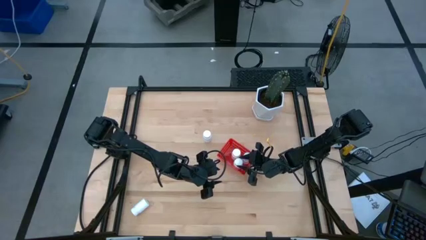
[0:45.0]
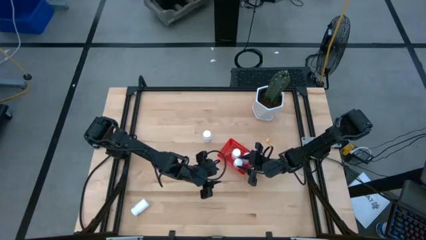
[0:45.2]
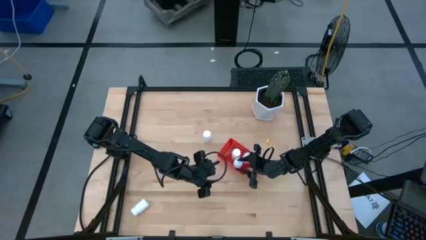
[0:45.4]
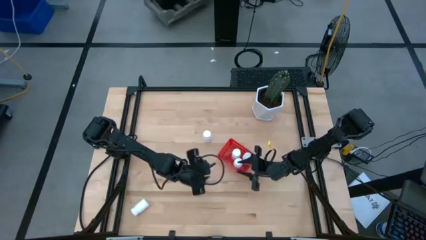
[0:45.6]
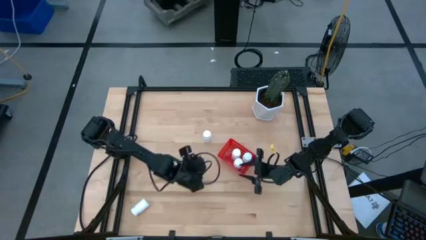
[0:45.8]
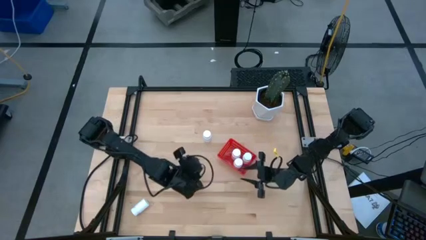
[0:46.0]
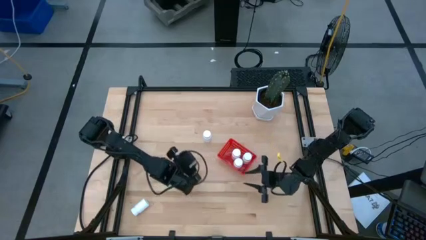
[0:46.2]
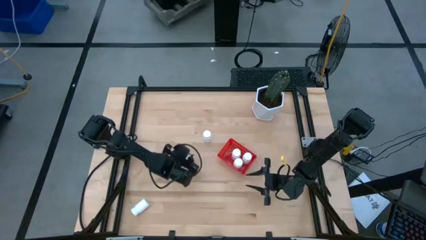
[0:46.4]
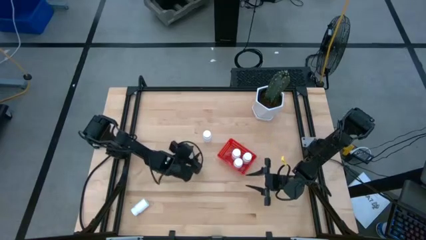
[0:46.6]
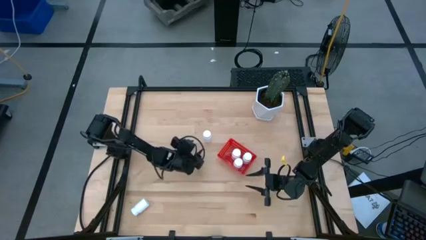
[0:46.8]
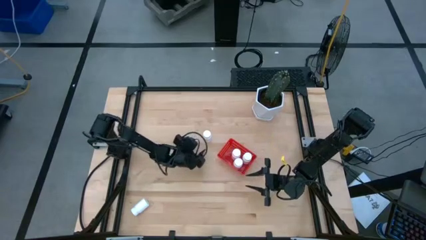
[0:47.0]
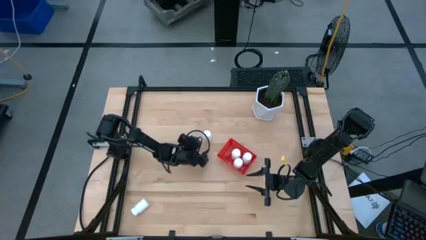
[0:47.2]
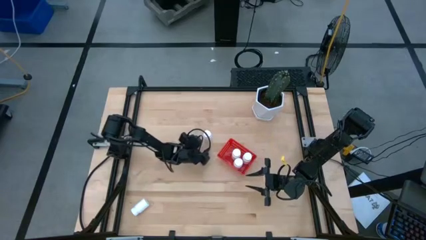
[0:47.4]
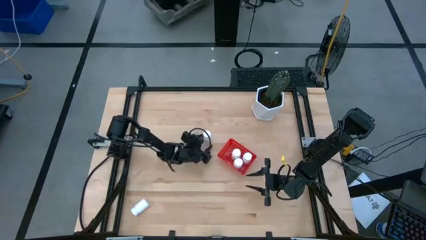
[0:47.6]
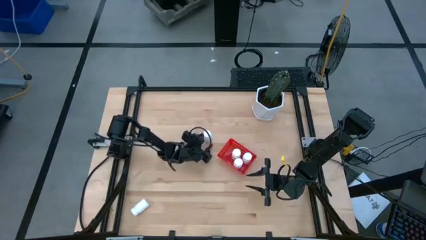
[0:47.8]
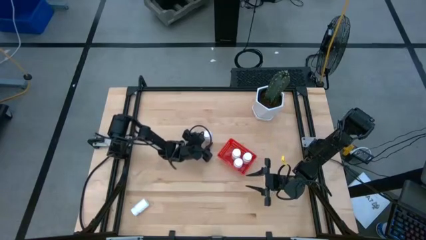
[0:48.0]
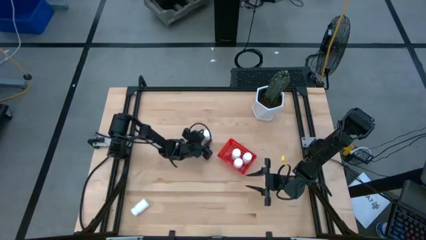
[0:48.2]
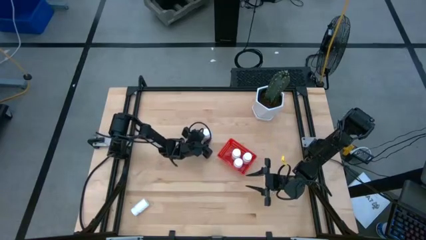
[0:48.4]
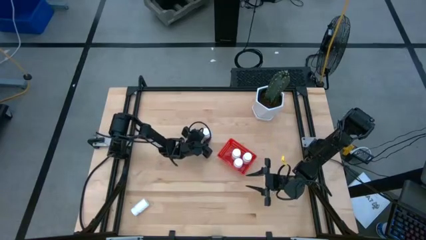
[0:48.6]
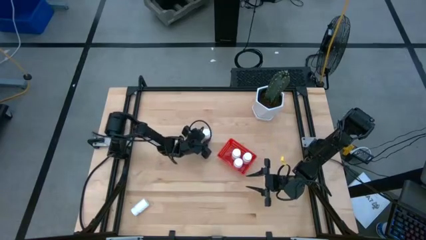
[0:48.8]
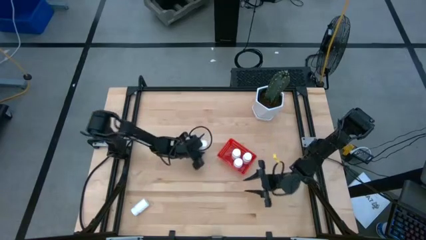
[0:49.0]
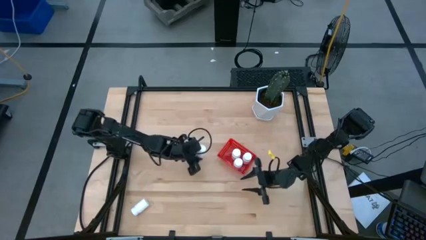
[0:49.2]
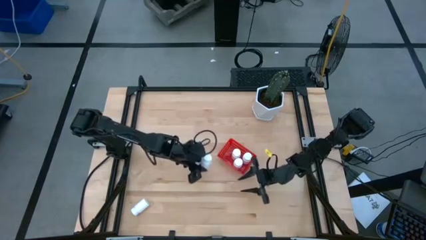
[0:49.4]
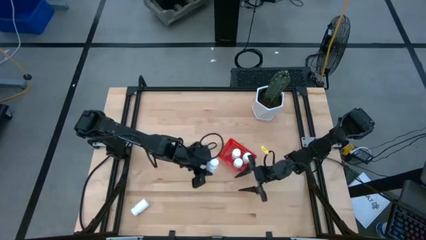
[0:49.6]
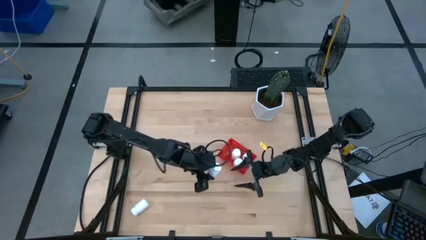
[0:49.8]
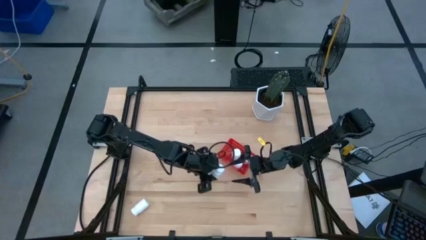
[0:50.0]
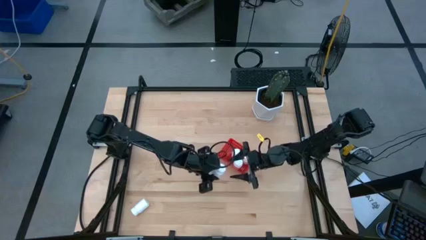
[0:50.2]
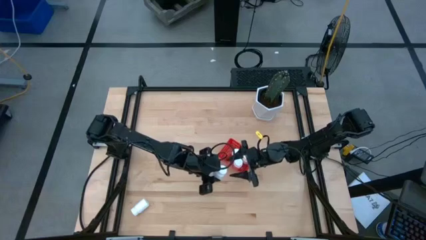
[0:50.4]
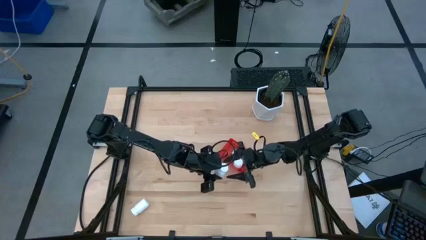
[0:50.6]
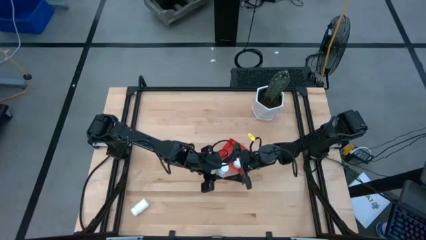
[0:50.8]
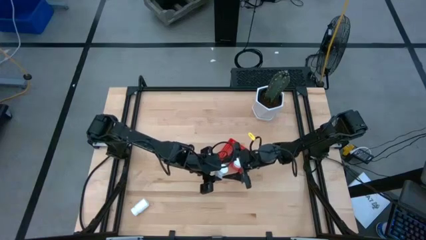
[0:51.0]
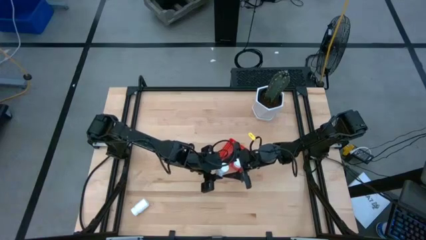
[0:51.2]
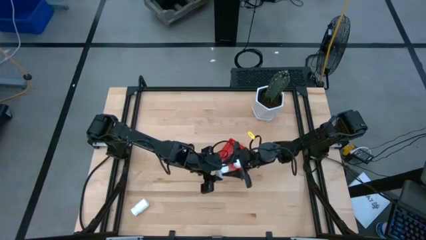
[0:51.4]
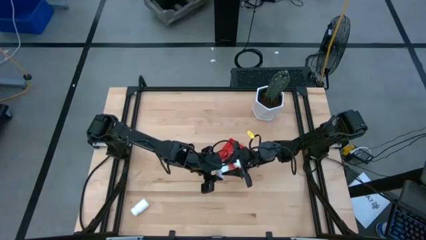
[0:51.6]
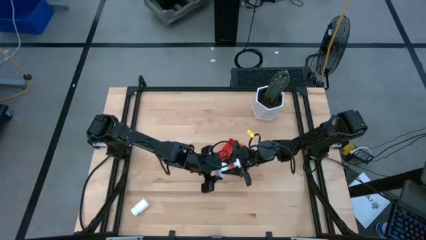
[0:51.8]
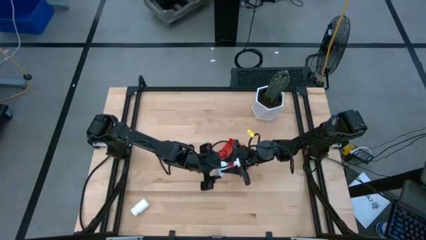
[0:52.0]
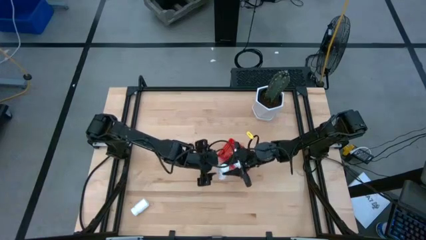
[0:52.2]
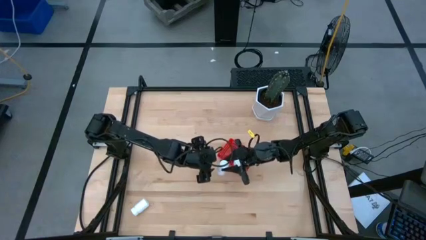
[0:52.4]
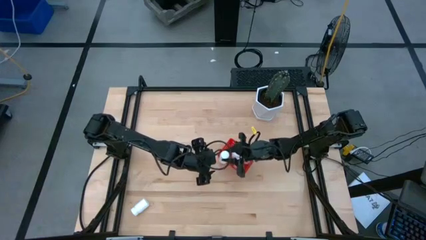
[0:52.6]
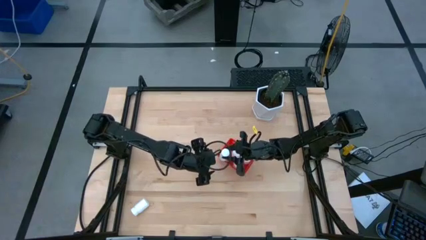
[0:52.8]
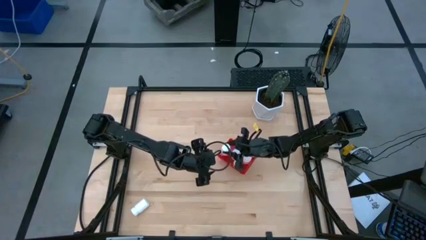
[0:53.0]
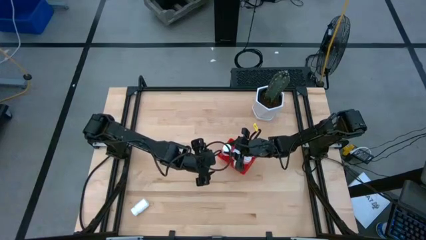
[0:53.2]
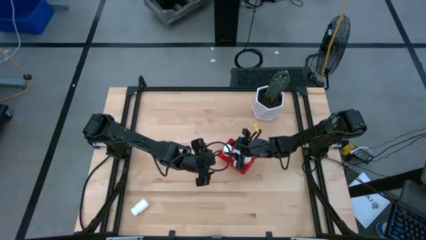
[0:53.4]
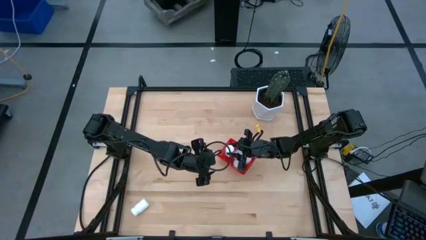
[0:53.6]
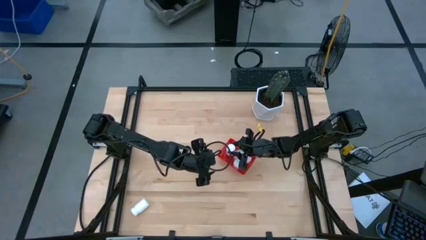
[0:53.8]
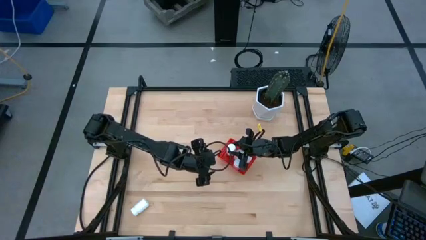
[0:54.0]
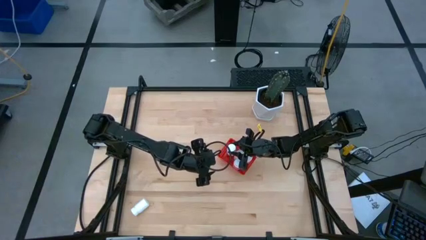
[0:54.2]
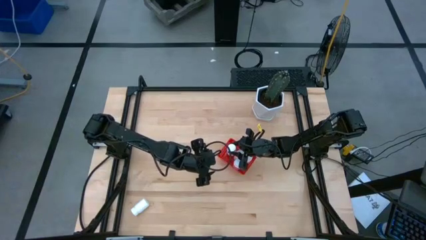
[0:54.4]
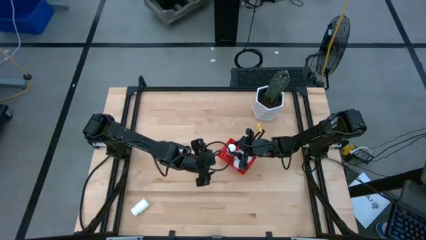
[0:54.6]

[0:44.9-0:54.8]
Task: Pick and place pill bottles into a basket
Put the white pill bottle into the red bin

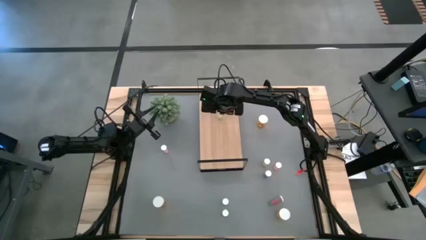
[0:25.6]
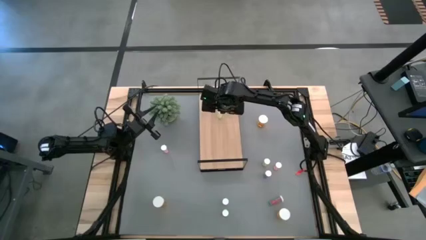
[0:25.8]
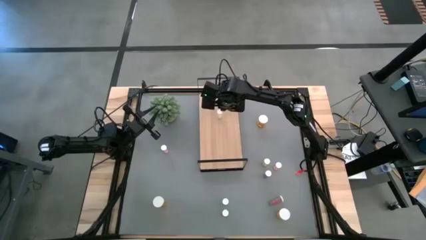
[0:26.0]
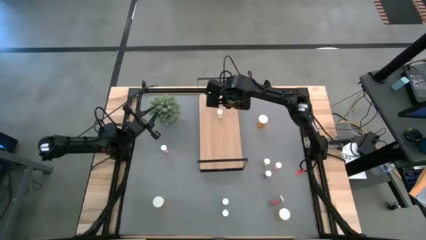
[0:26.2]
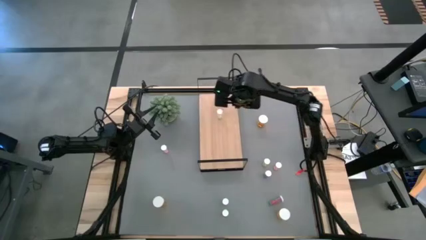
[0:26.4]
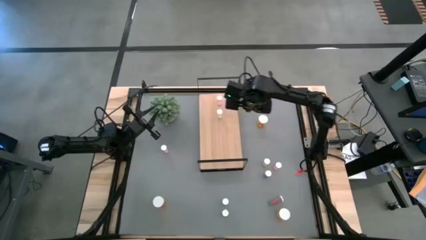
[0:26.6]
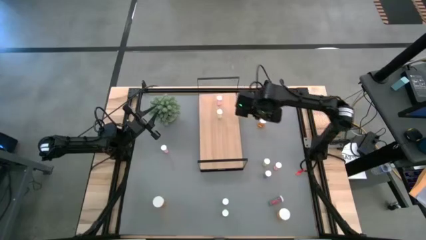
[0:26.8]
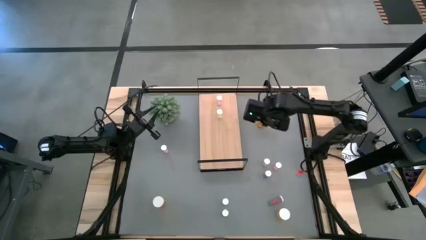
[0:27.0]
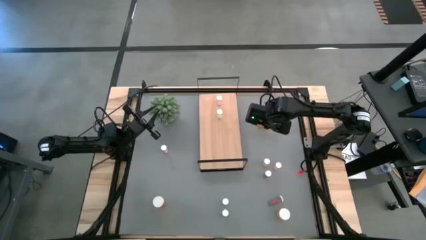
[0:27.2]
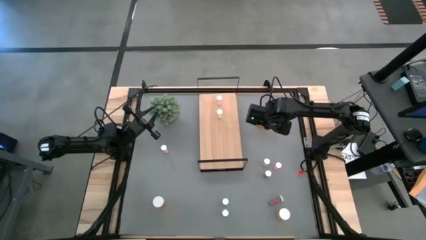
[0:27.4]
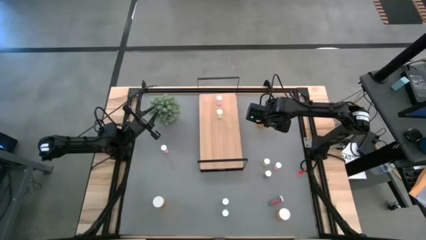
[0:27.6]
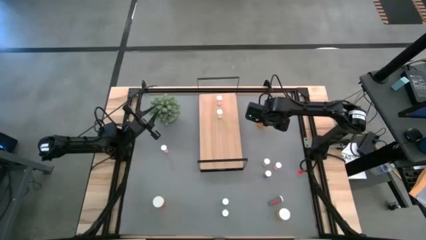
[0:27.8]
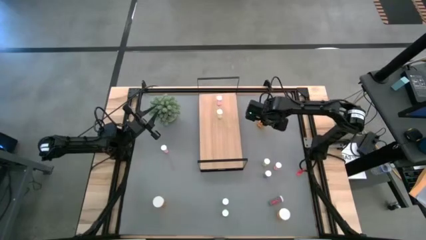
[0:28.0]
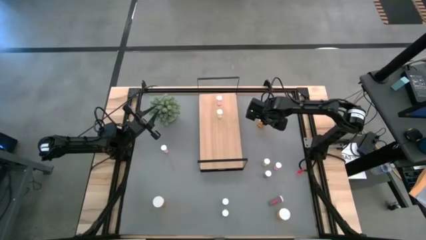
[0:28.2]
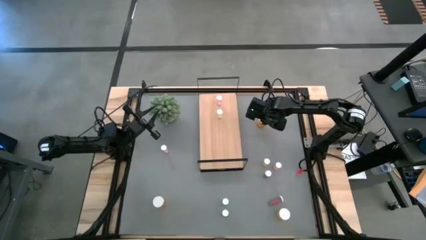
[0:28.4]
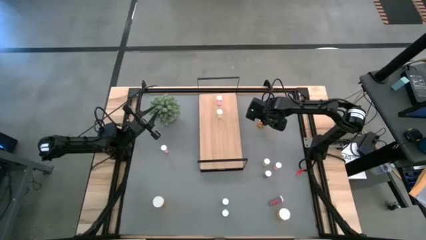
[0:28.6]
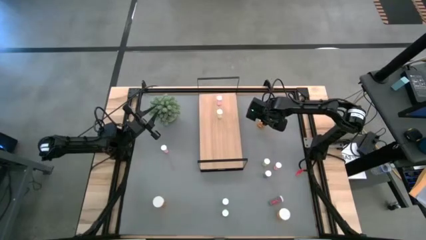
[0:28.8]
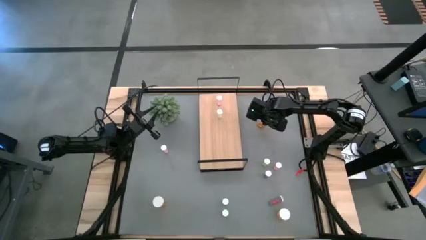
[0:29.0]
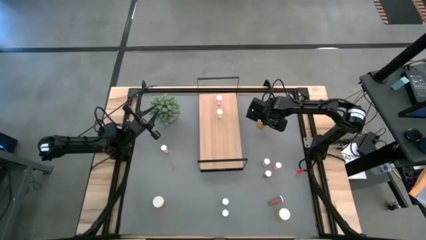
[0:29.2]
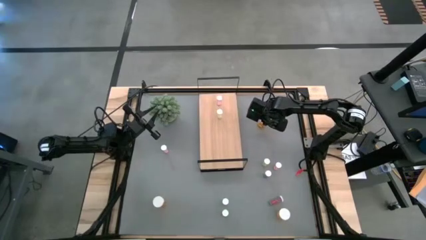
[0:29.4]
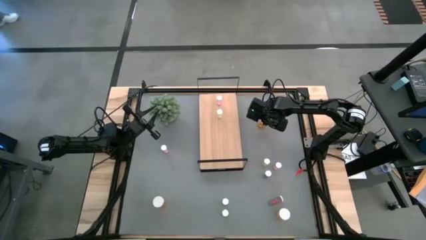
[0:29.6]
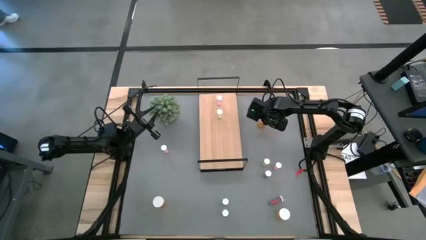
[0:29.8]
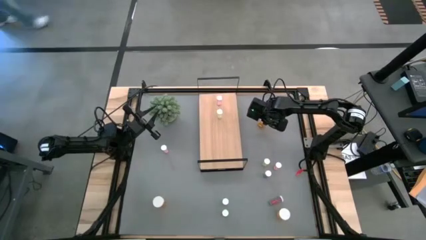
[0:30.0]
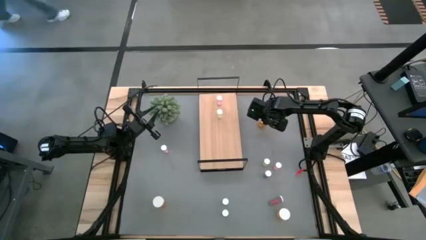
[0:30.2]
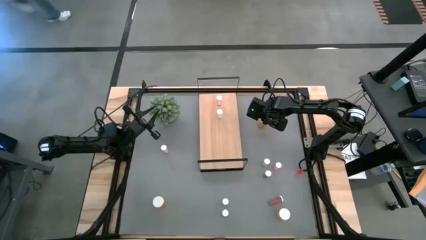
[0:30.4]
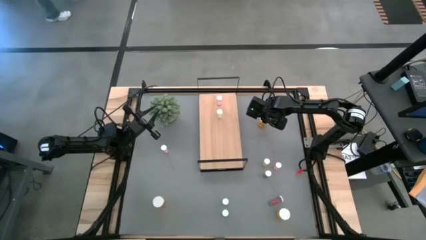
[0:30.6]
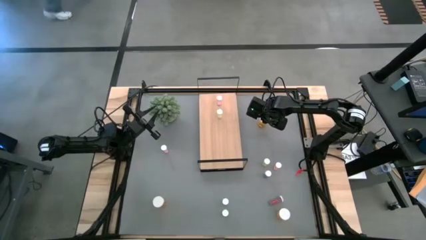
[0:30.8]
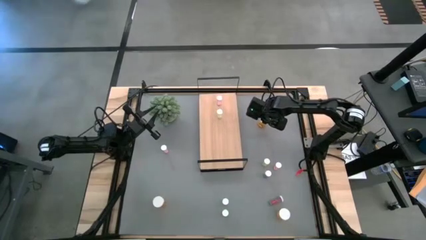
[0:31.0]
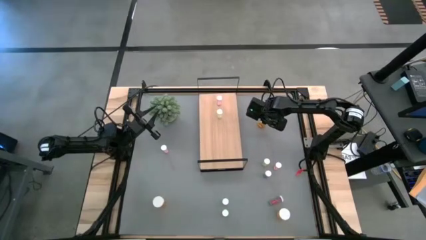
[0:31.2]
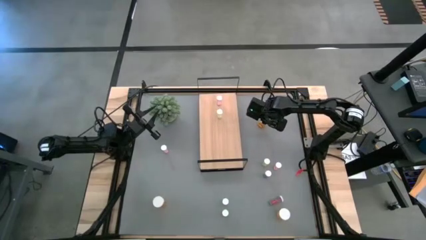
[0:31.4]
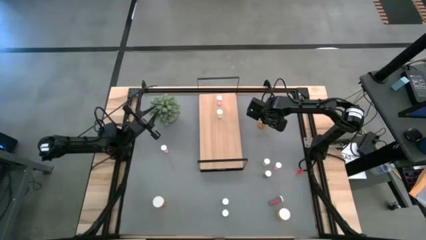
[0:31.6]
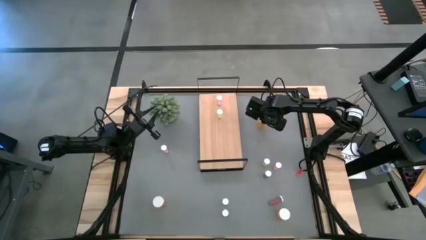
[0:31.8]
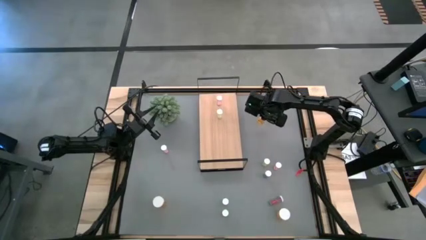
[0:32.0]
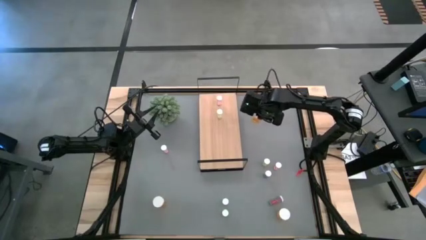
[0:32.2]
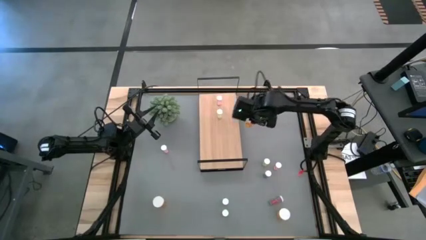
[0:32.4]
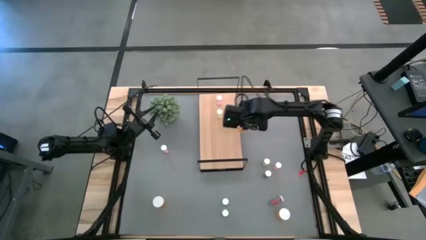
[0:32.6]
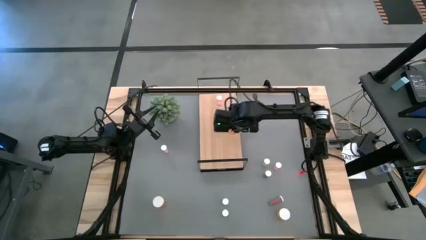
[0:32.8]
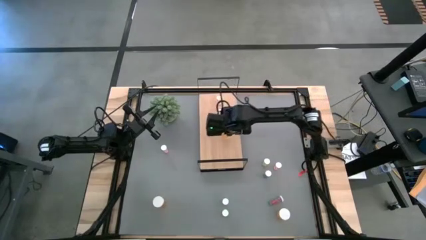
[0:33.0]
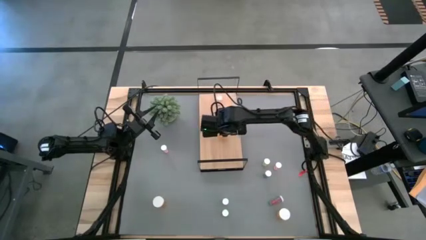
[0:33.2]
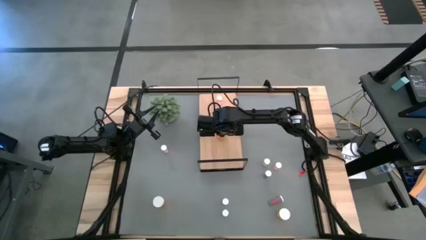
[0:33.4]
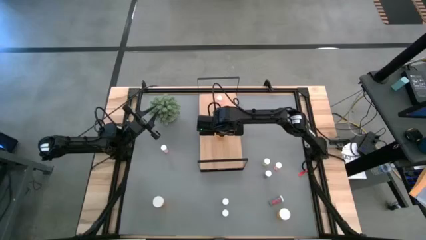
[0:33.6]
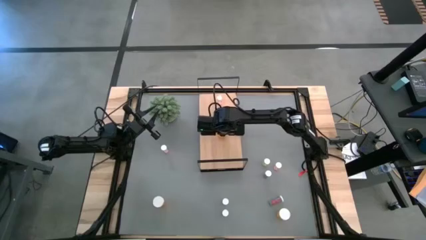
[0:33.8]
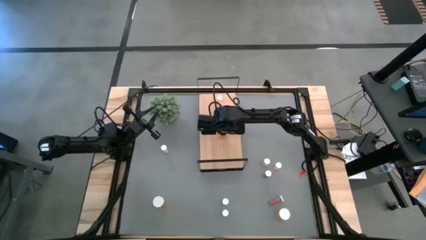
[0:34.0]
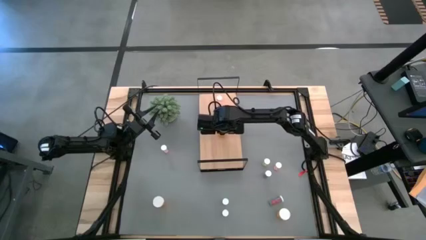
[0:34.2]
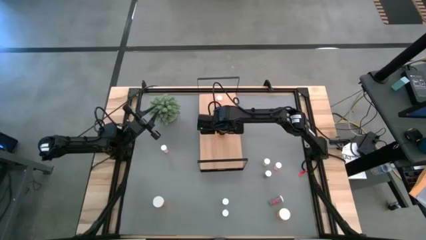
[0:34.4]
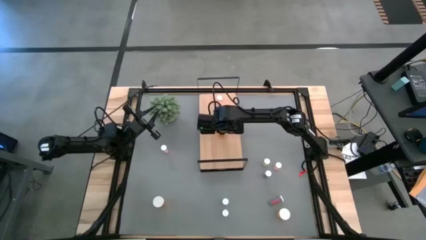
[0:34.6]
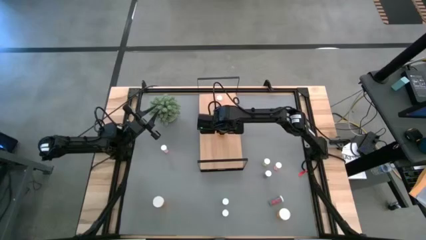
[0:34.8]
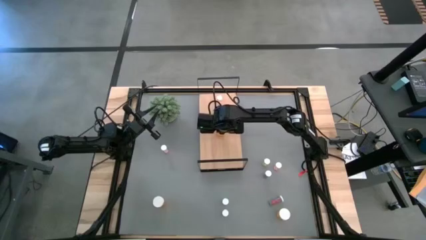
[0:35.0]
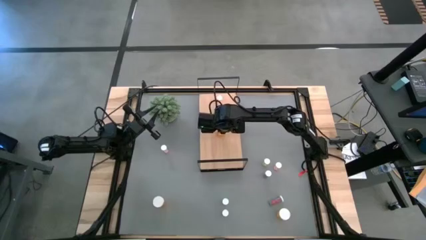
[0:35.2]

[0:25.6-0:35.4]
Task: Pick and place medicine bottles onto shelf by color
Put the top orange pill bottle on the shelf
